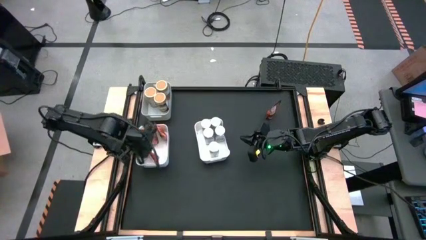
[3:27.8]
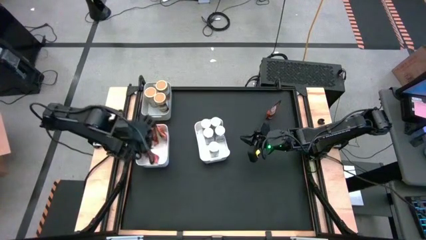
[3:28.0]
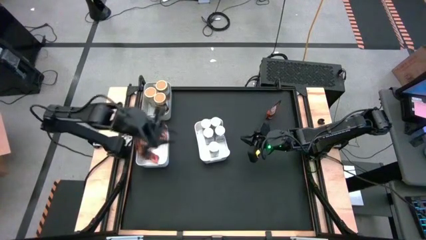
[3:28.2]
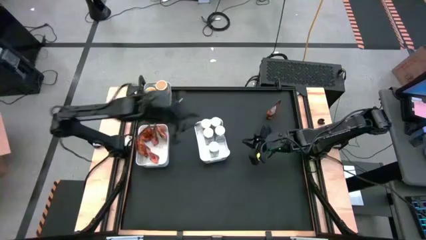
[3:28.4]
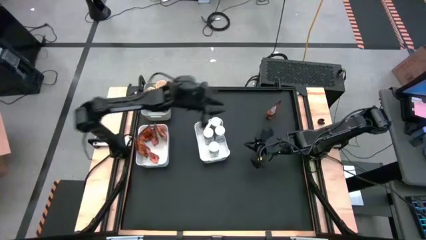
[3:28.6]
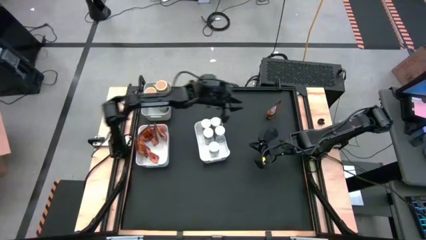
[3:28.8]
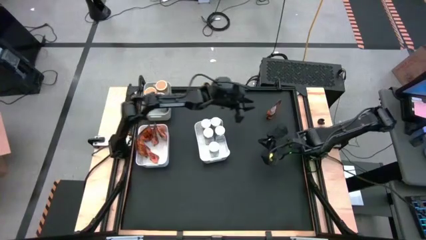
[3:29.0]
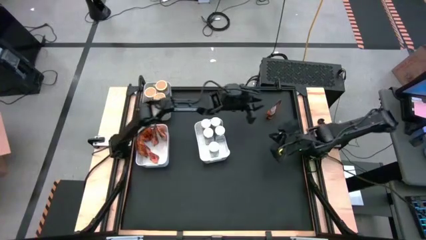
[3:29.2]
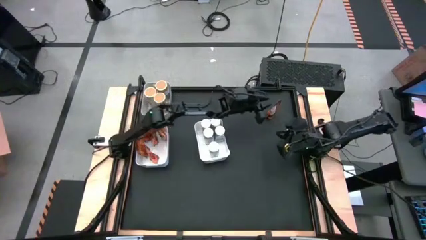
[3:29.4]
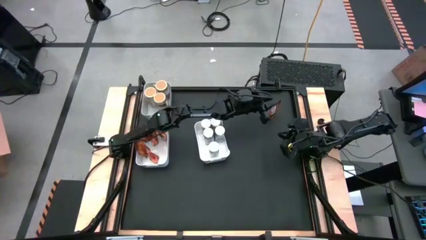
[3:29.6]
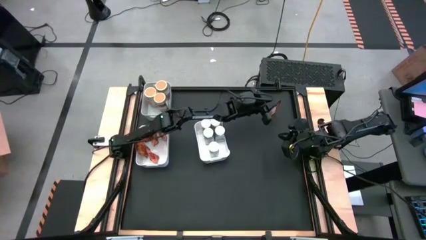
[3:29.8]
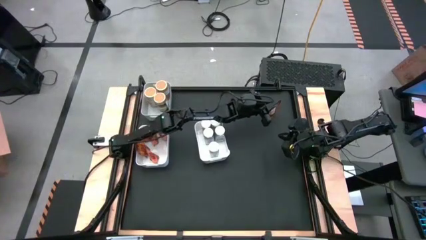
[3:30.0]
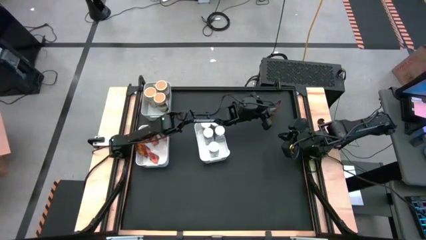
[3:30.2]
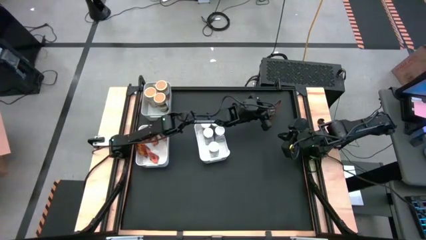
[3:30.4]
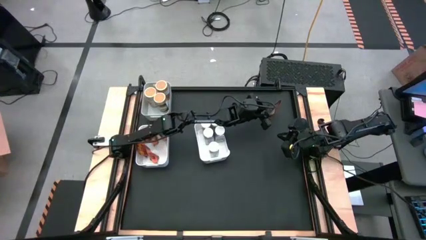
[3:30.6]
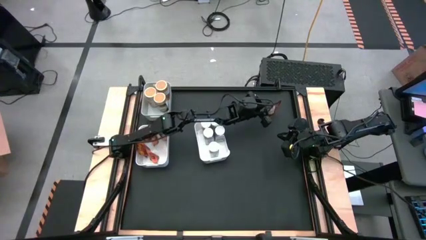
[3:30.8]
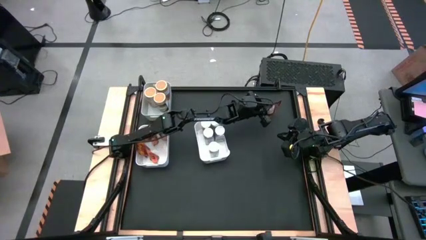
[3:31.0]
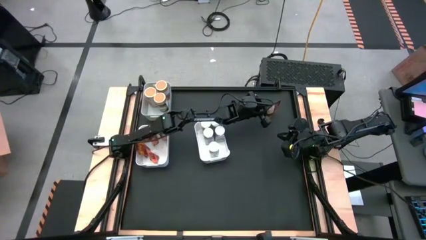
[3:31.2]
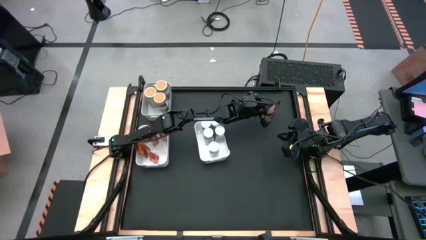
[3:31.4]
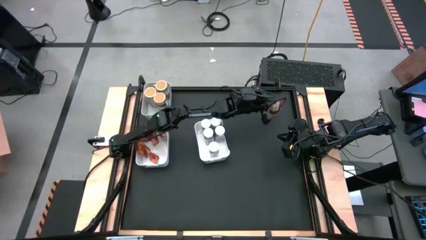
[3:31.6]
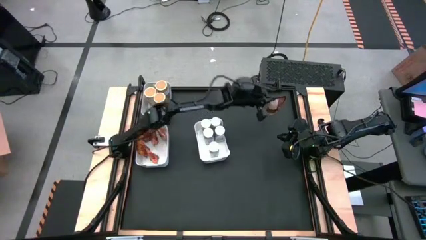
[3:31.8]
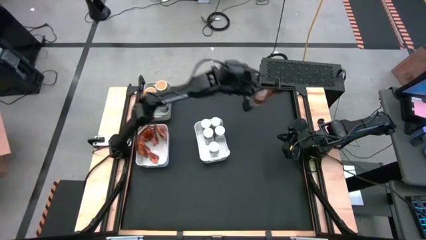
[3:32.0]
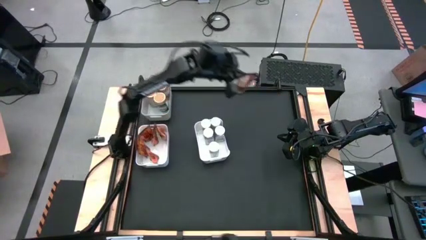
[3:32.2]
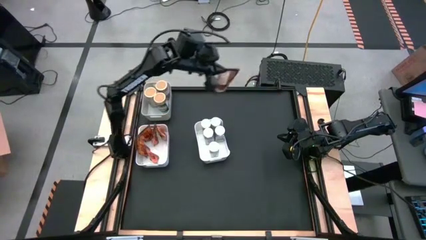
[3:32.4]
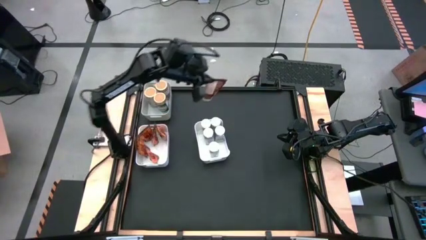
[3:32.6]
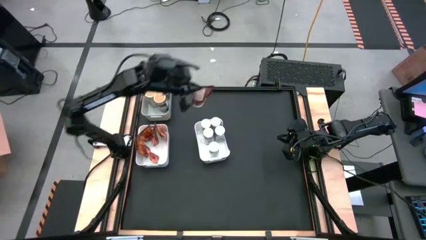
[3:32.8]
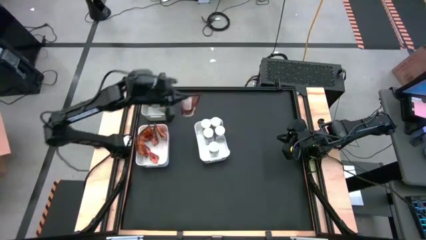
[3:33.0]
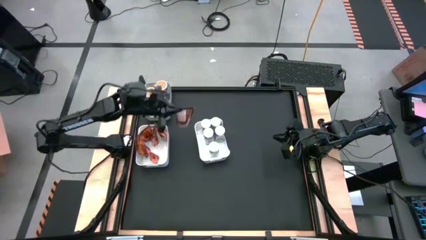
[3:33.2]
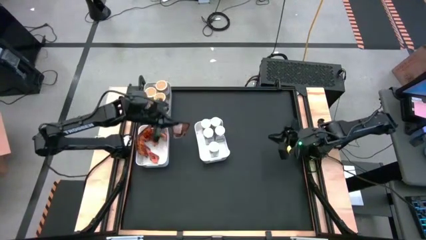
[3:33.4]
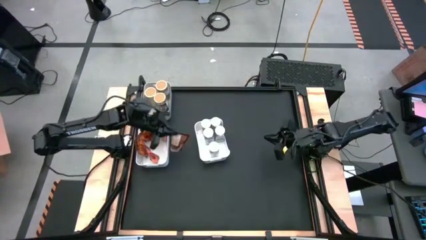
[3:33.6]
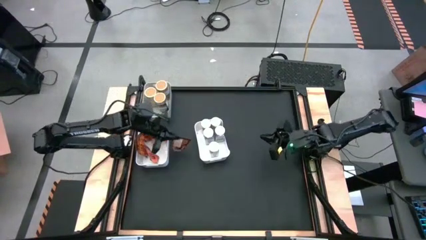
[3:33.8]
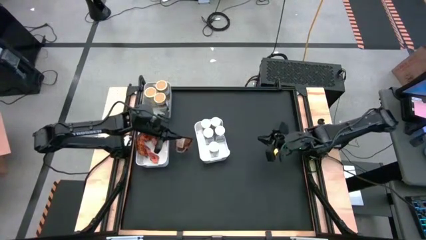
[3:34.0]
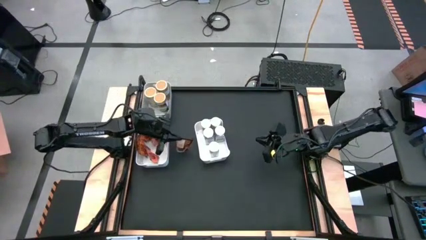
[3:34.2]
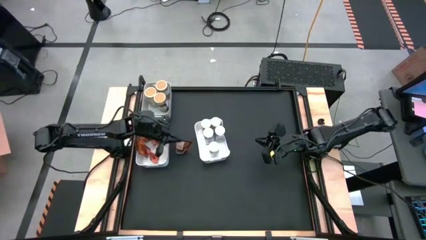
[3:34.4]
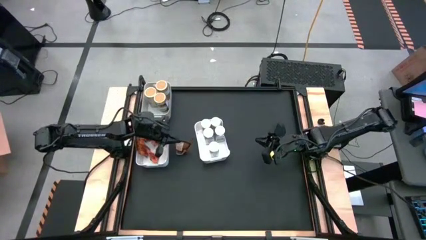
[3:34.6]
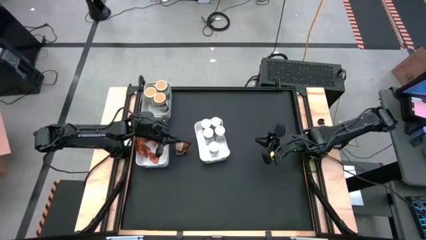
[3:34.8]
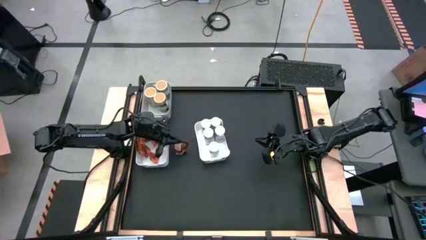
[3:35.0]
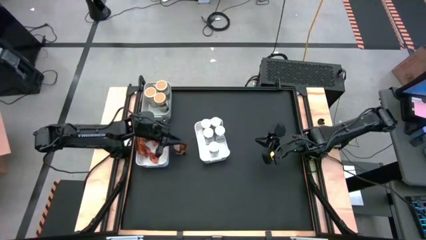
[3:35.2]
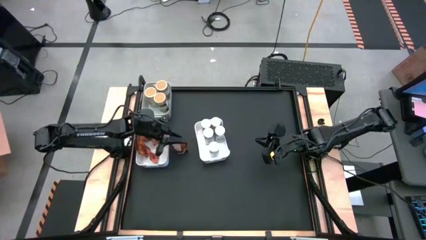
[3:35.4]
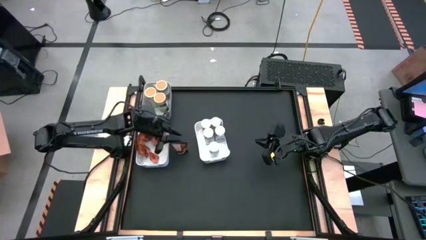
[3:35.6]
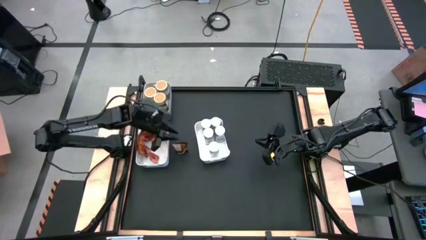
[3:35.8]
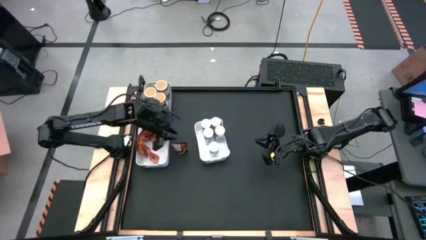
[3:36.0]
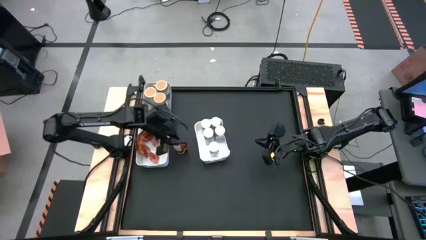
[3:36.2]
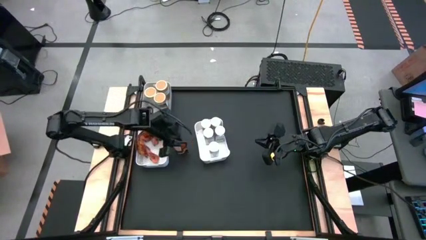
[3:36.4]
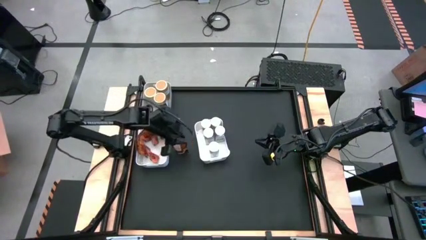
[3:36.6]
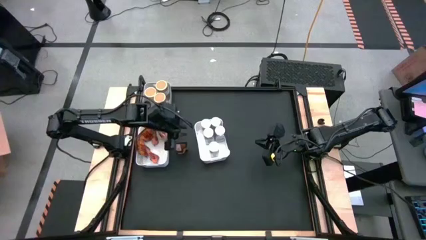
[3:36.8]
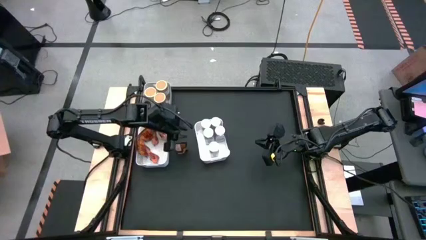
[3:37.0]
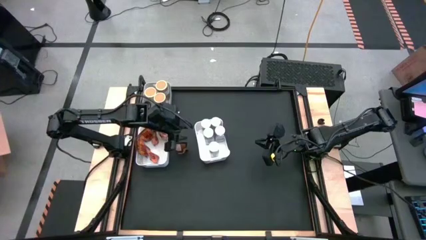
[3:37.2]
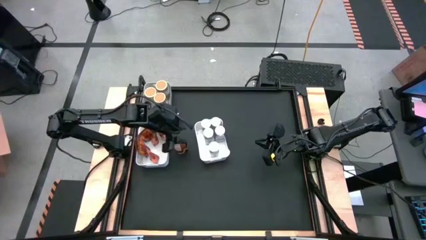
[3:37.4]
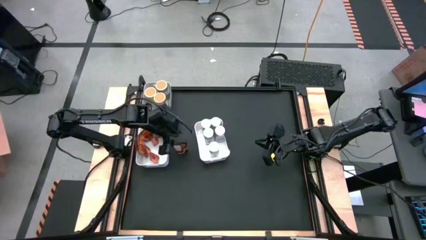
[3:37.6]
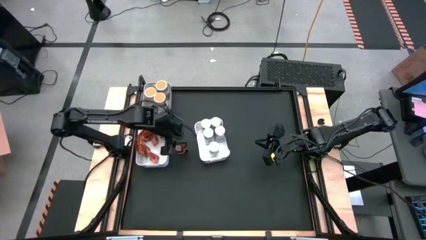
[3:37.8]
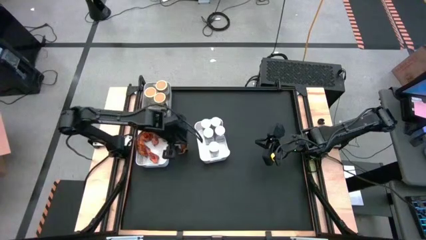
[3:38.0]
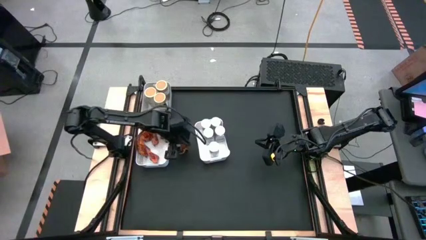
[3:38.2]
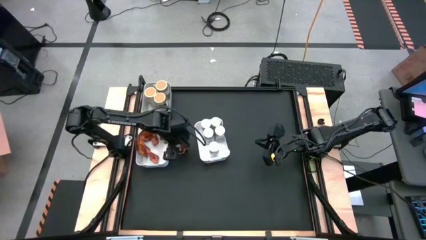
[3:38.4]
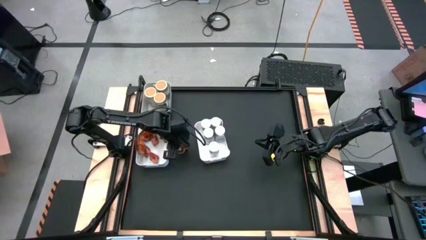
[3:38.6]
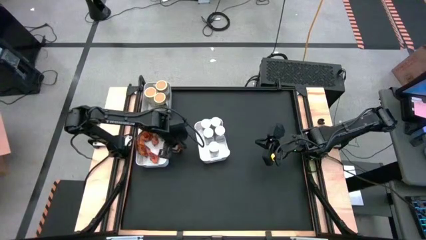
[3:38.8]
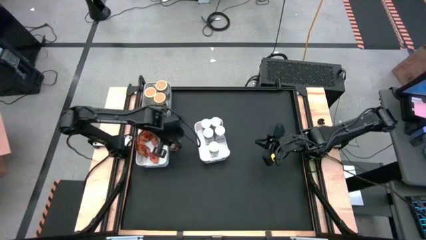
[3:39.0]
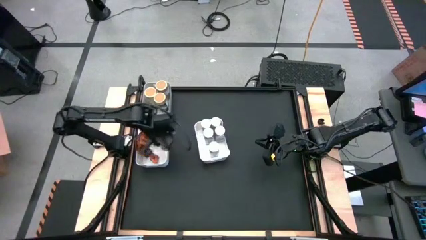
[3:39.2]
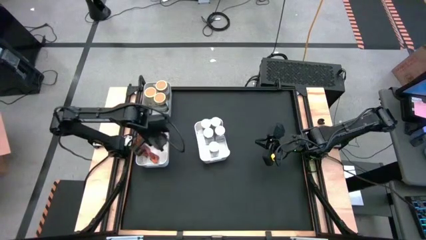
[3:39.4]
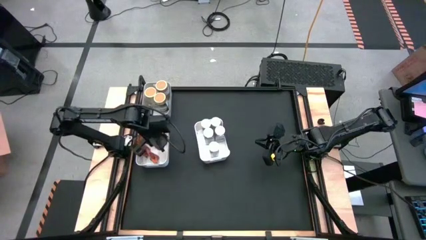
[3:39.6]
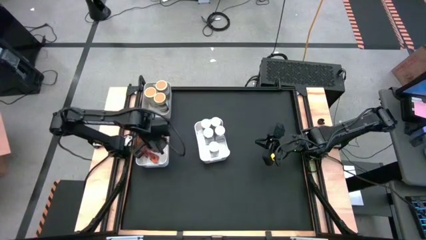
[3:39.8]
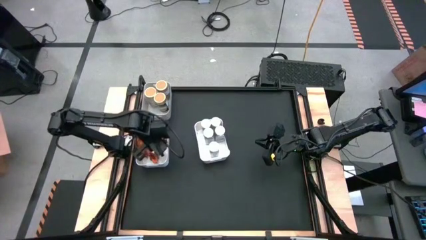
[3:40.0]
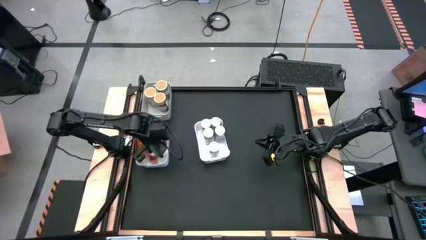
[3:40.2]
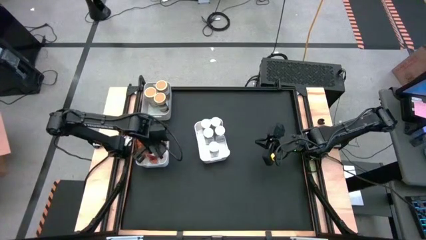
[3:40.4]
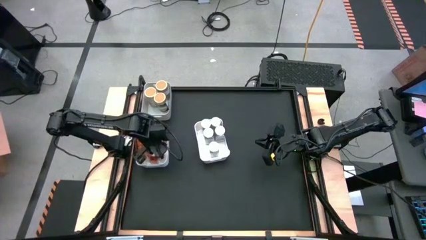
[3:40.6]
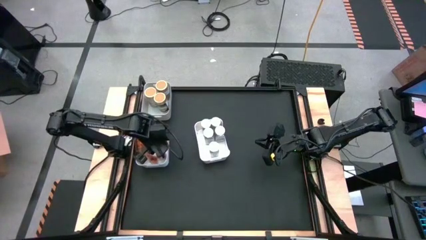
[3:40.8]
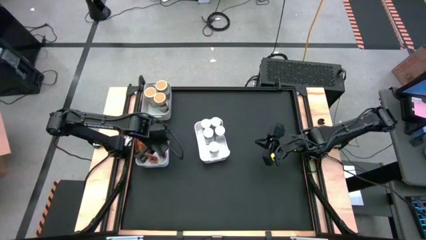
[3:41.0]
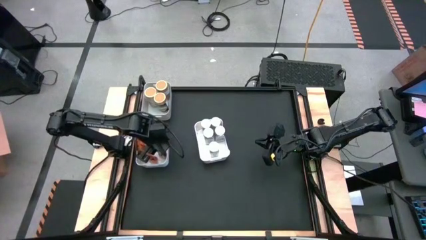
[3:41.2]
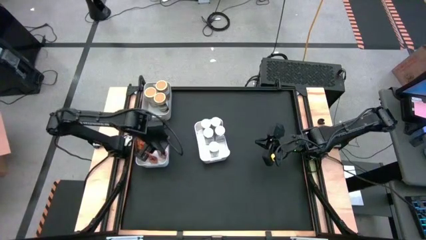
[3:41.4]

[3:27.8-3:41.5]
Task: Sort spices by type
Put the orange seasoning pack into the left white bin
